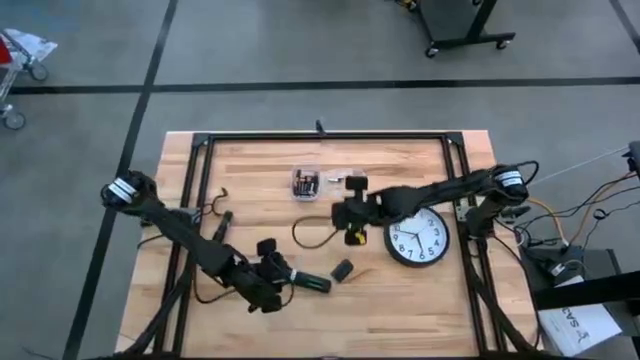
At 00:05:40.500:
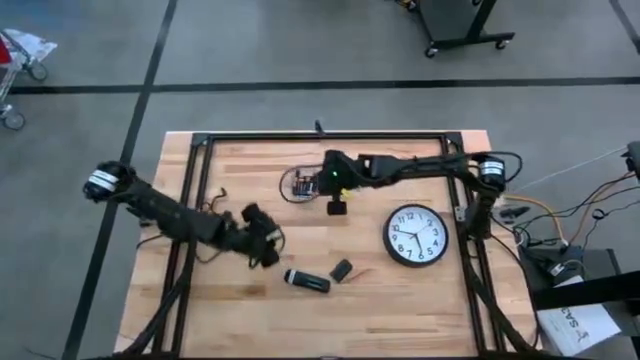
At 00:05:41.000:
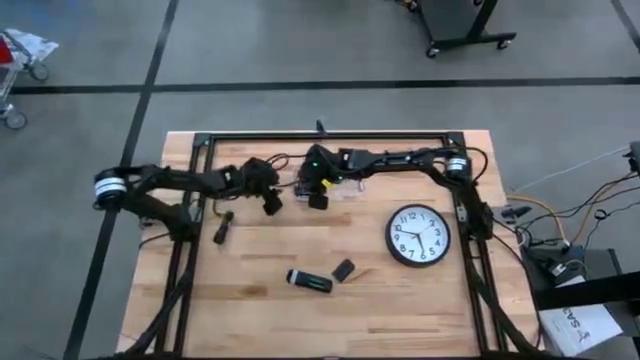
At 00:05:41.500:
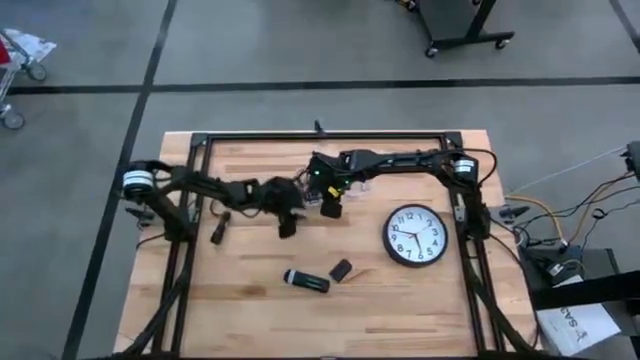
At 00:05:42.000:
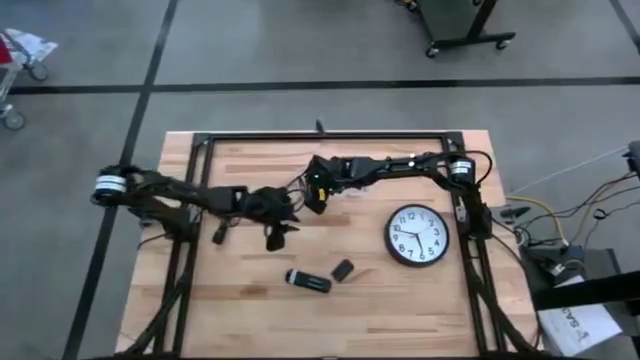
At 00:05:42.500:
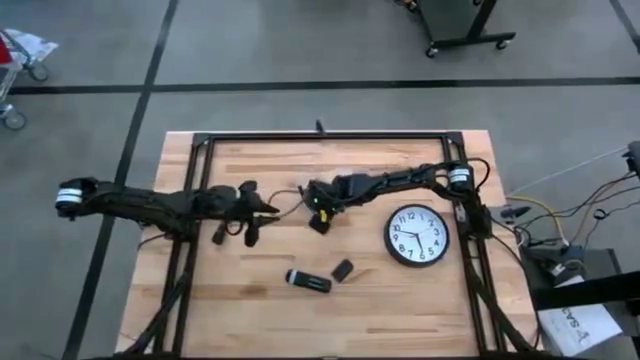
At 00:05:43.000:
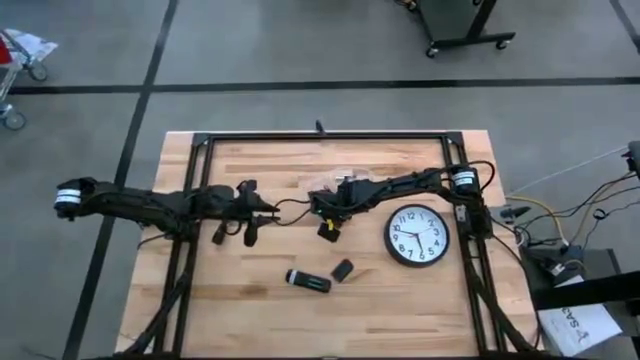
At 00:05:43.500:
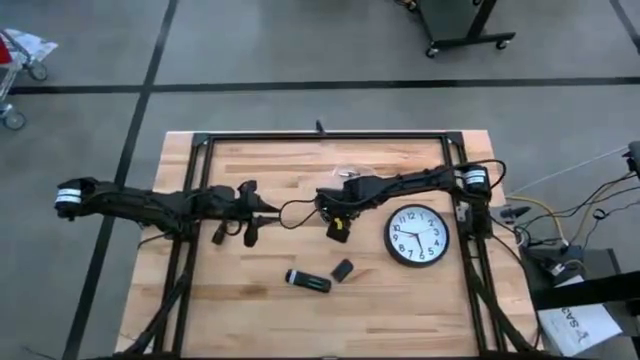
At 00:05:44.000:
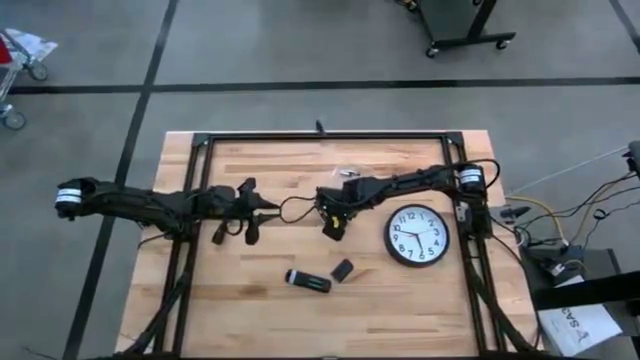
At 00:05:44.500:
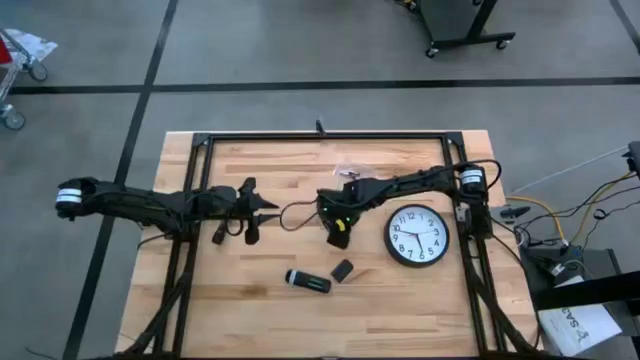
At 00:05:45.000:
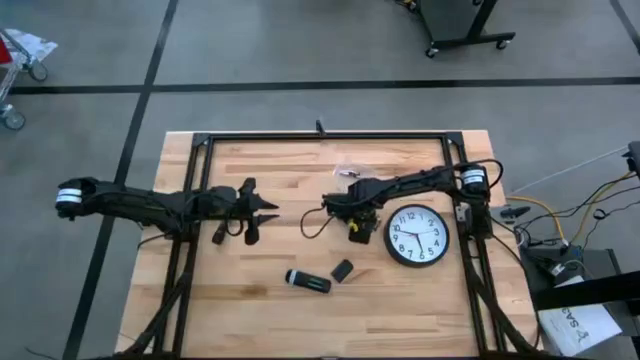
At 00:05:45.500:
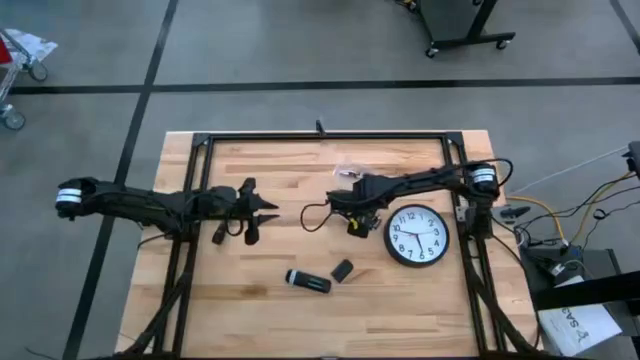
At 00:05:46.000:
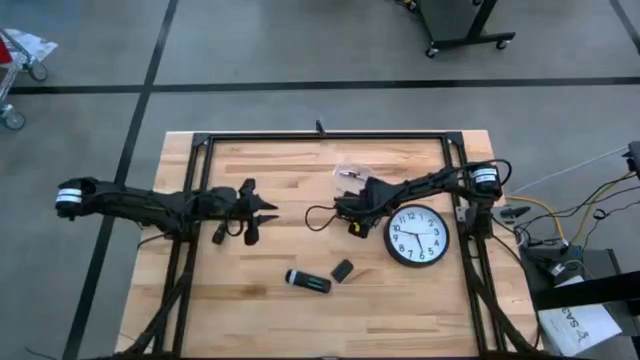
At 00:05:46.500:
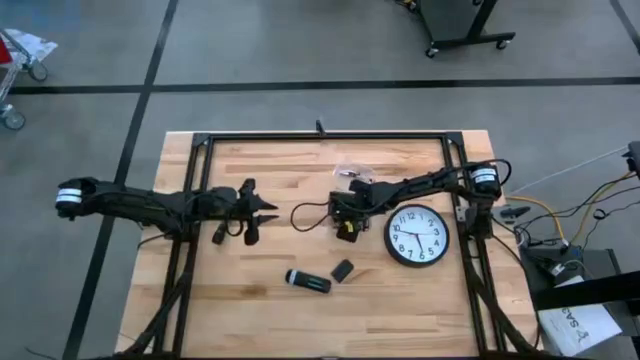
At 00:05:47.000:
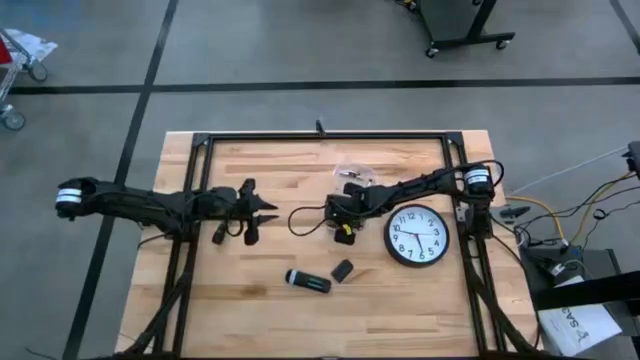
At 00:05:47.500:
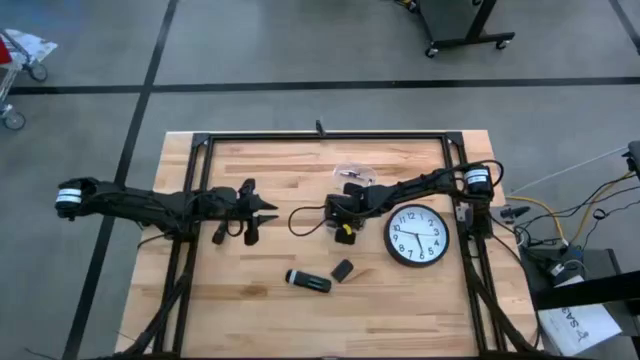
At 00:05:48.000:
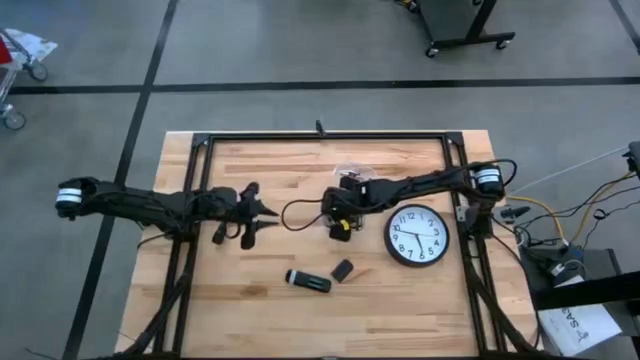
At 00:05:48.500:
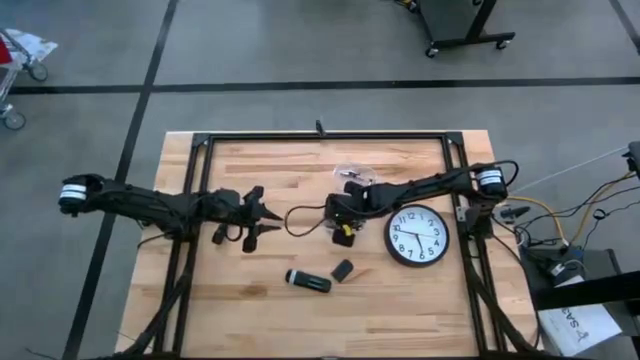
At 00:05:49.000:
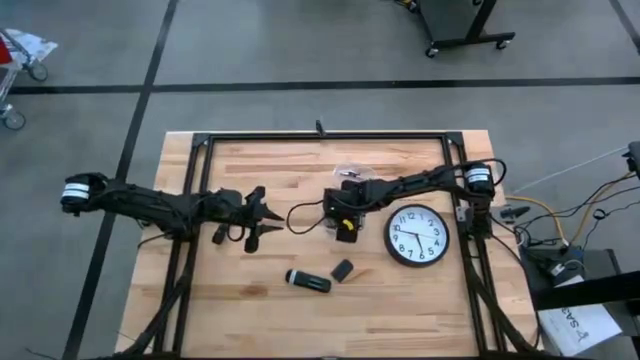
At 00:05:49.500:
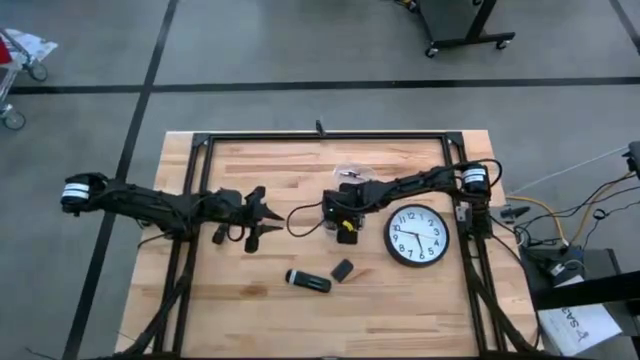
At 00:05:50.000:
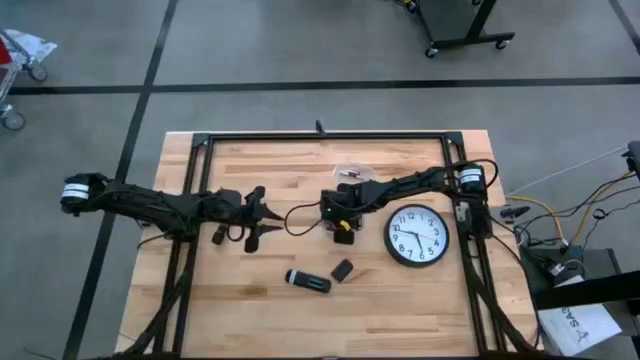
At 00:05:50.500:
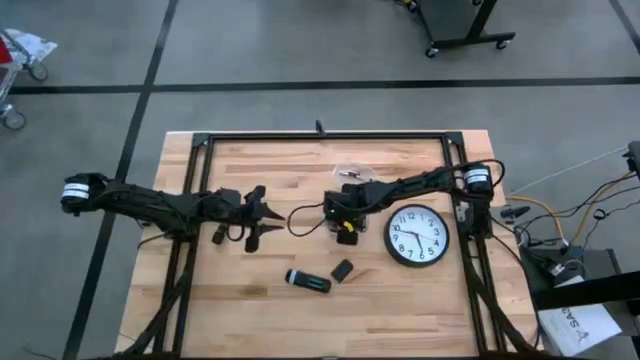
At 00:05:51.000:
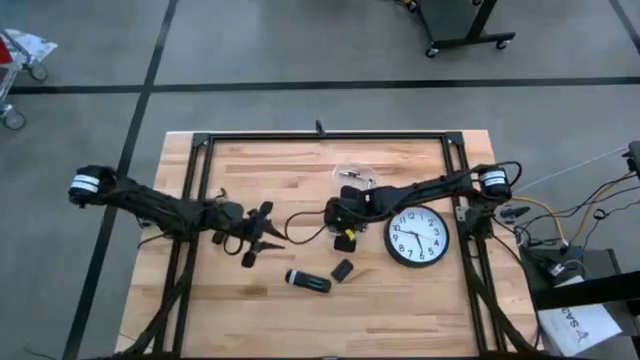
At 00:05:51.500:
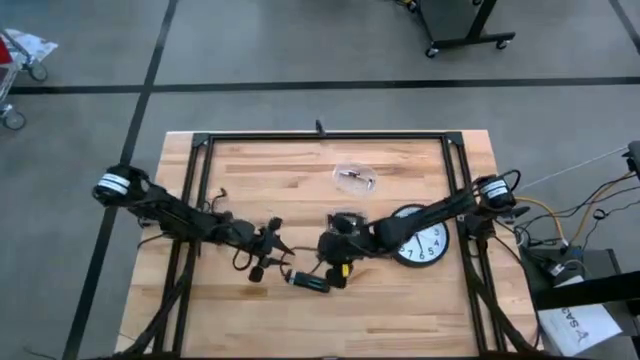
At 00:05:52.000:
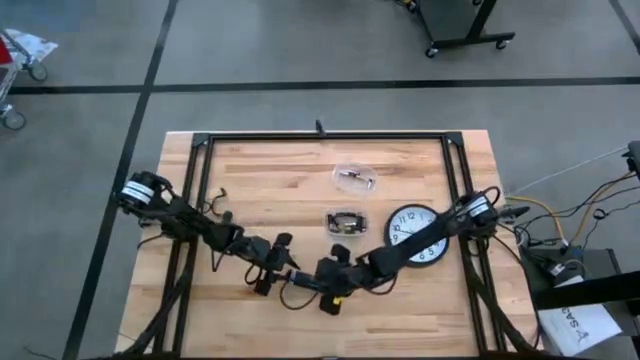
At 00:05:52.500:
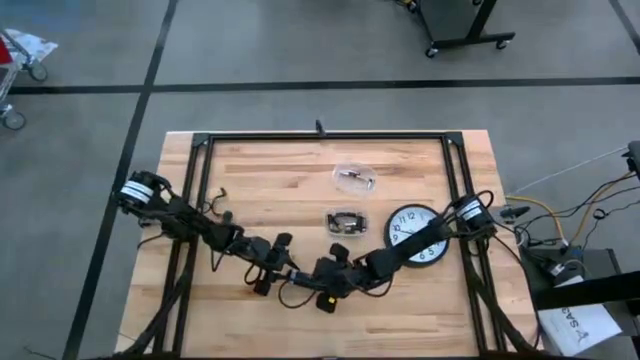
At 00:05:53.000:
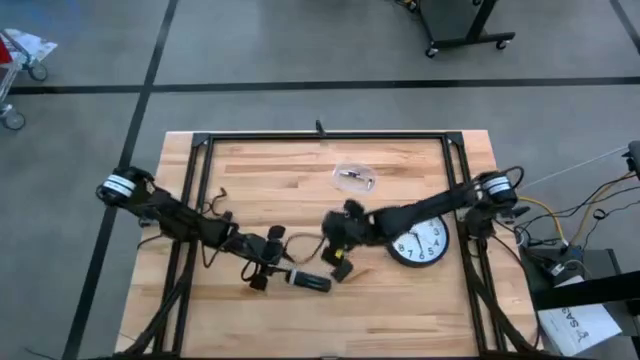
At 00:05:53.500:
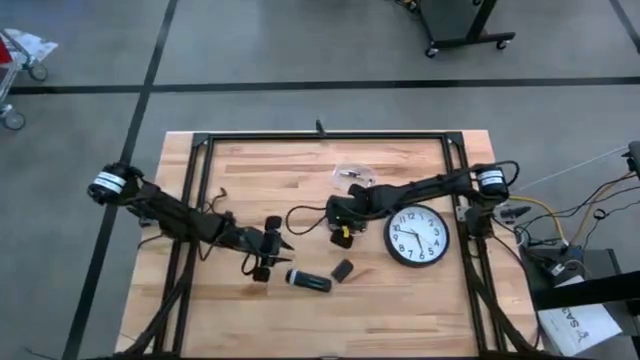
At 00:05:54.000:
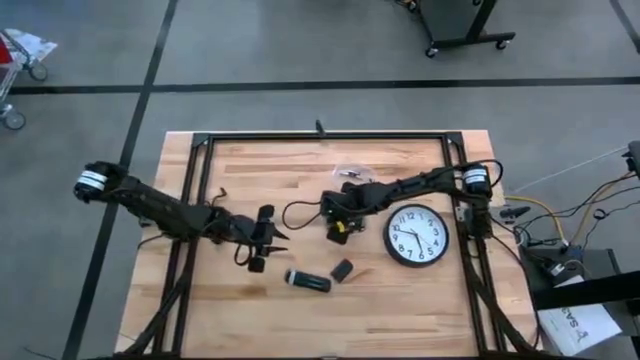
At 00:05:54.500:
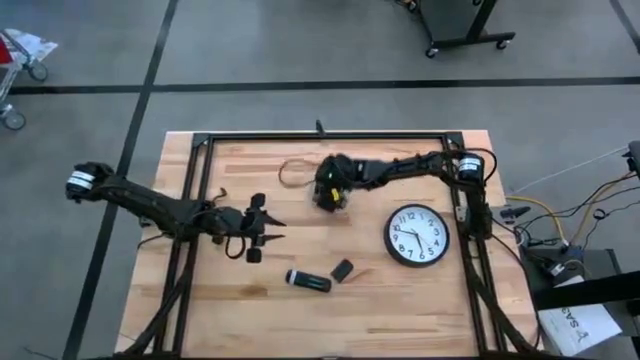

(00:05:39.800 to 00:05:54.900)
Task: Insert battery
Insert the brown battery into the remote's battery compartment

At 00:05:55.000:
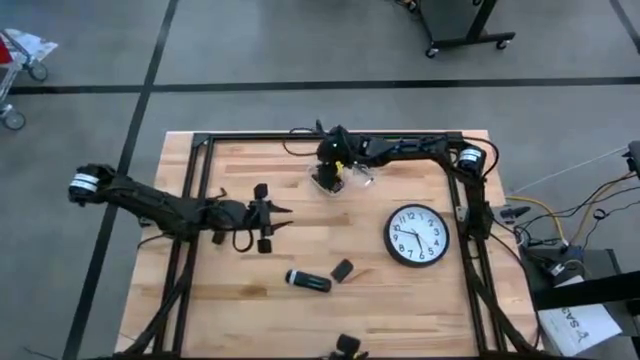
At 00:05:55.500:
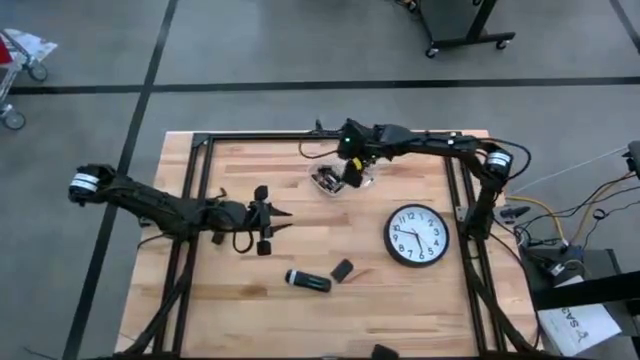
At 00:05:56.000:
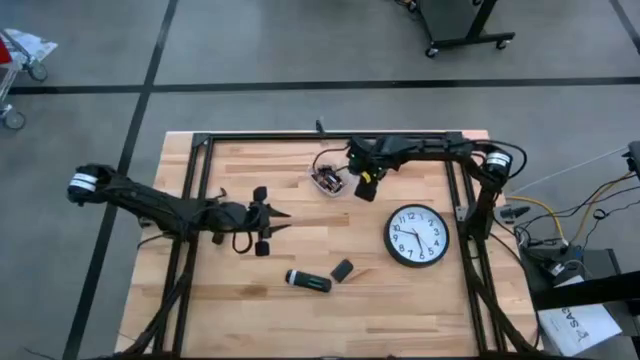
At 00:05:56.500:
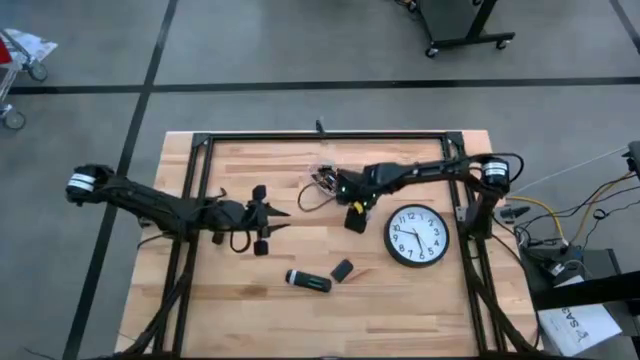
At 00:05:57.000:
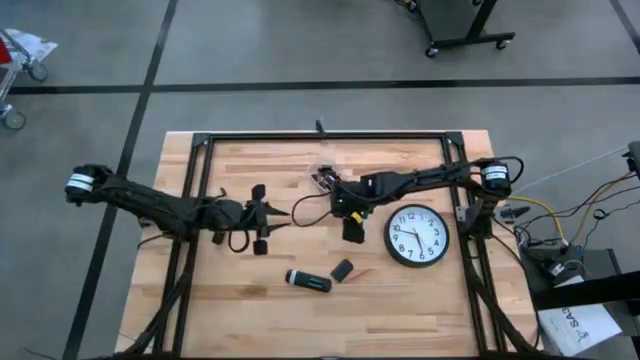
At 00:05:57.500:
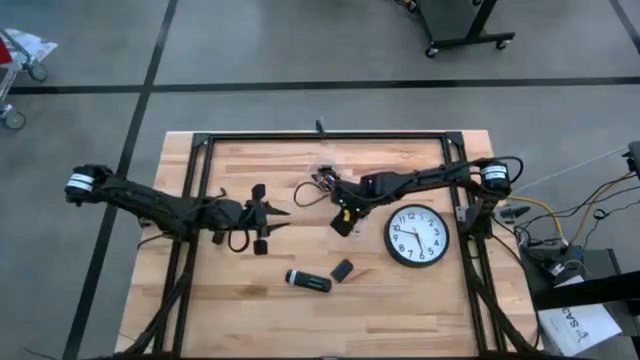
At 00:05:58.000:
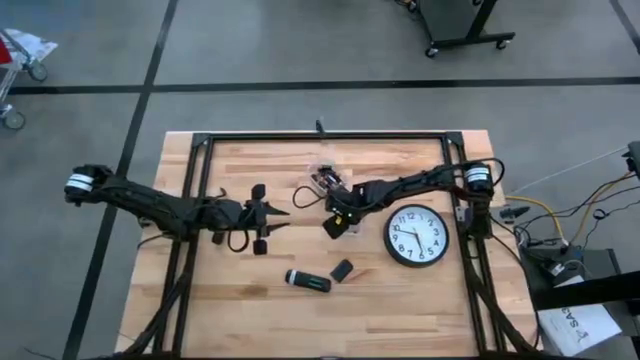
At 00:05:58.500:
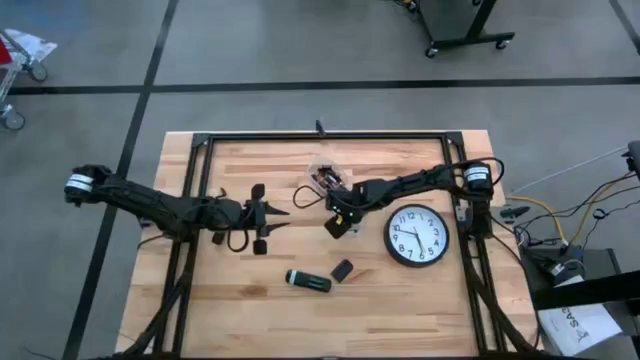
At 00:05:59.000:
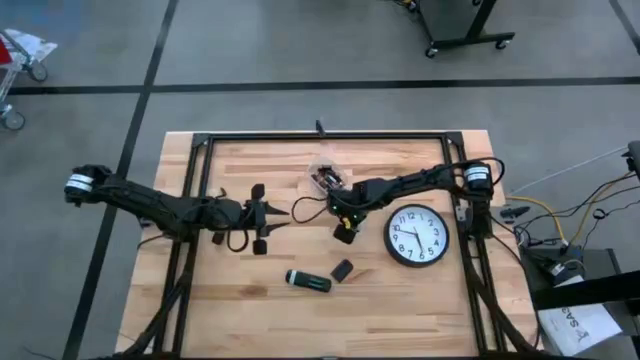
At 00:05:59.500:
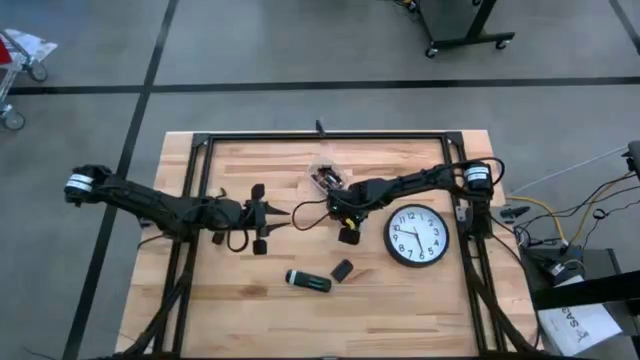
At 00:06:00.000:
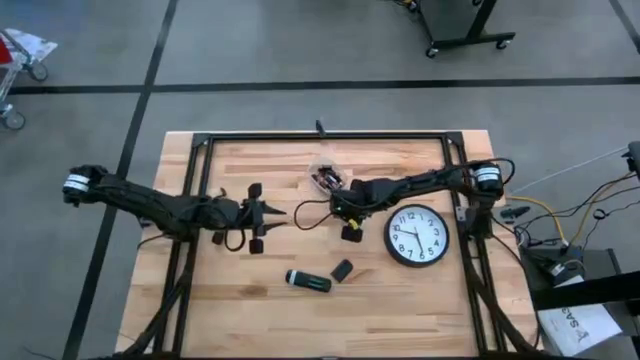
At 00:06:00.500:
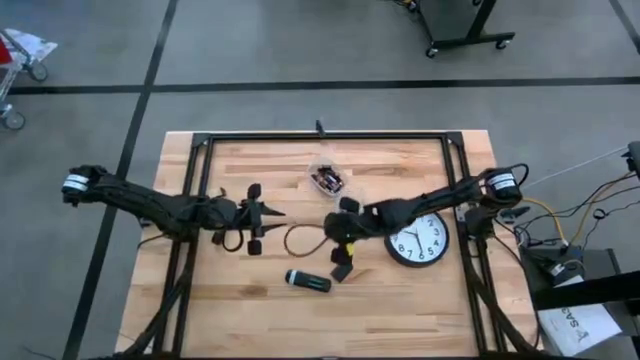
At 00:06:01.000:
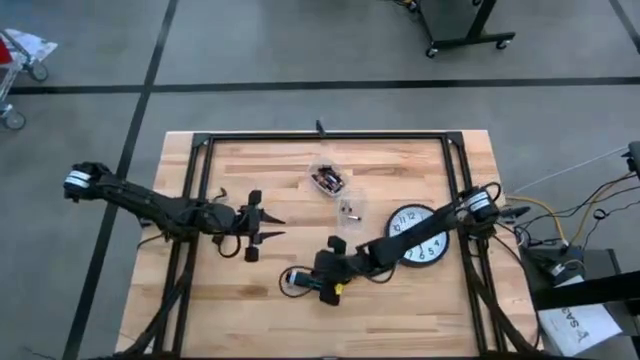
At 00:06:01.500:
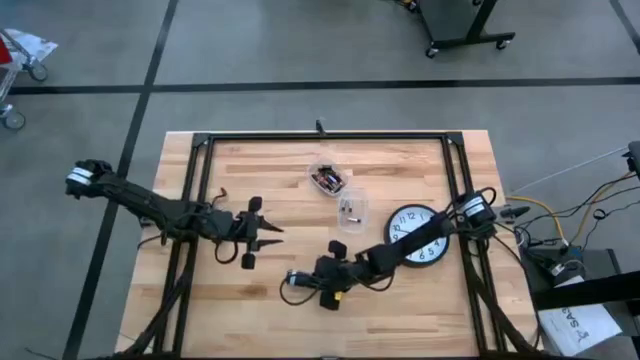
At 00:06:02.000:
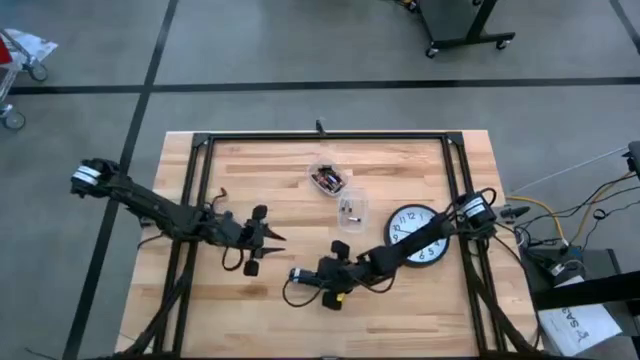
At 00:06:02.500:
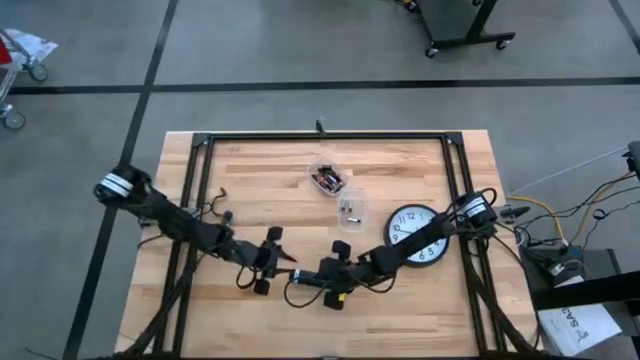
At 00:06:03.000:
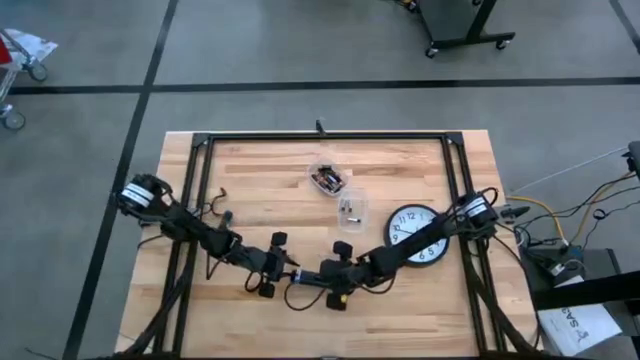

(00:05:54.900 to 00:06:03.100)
Insert the silver battery into the remote's battery compartment
